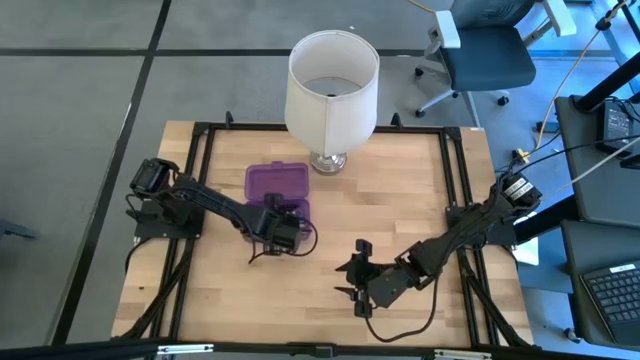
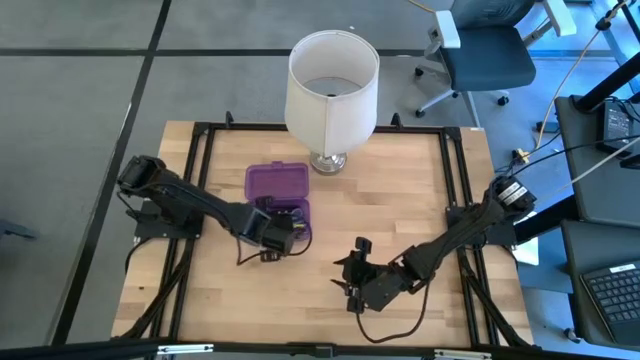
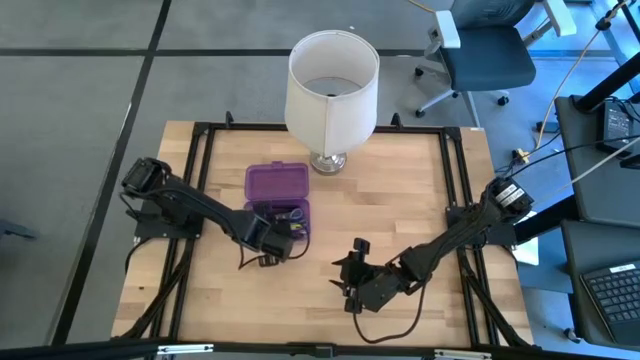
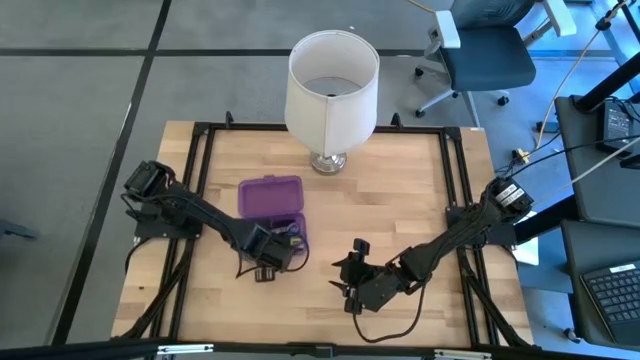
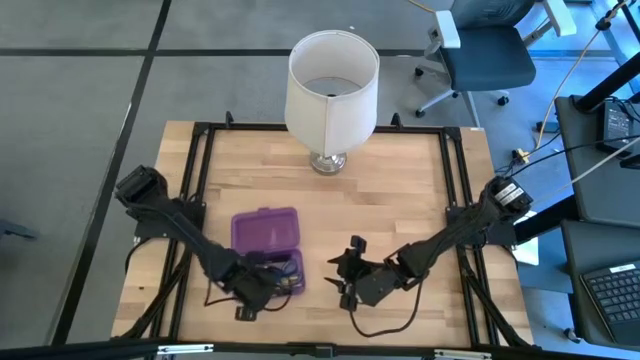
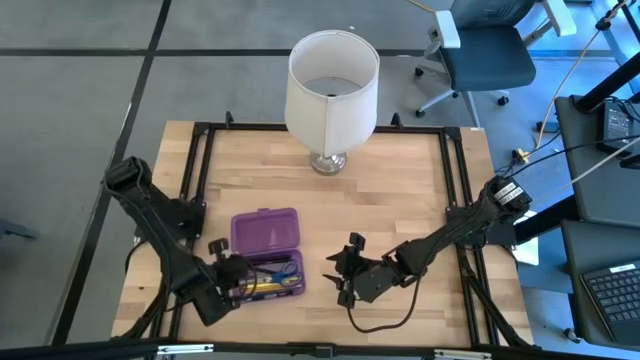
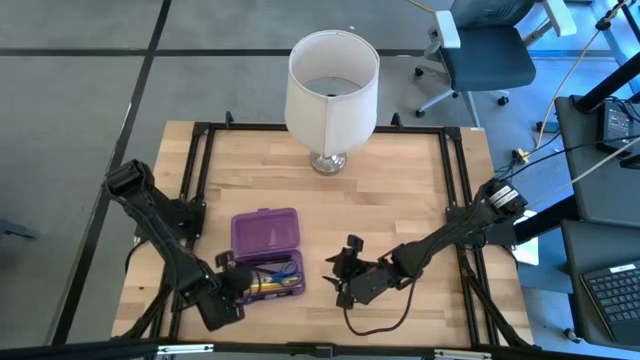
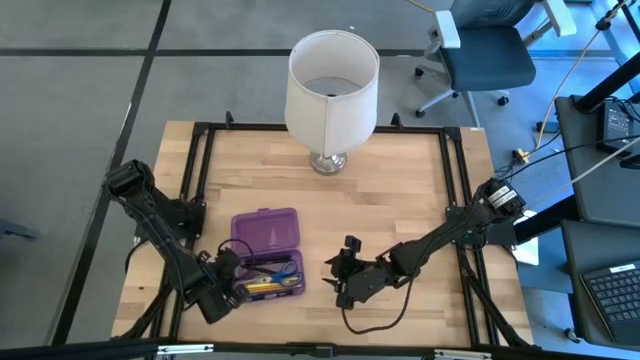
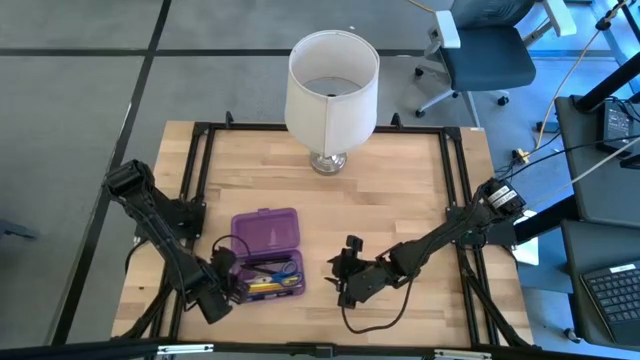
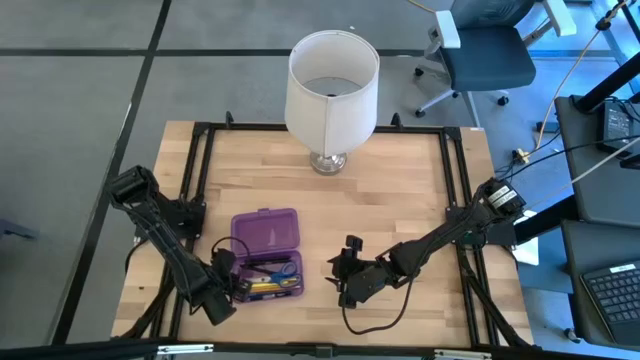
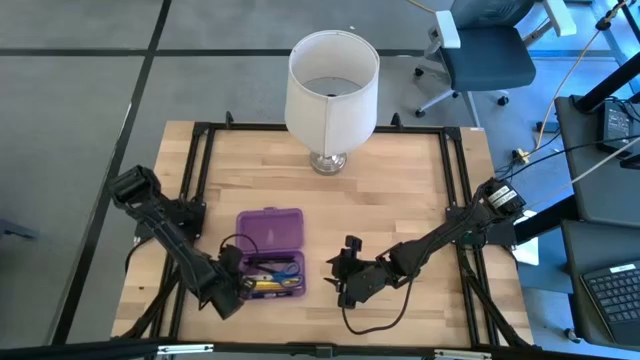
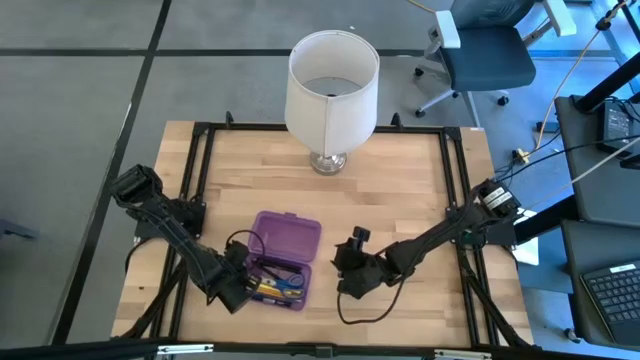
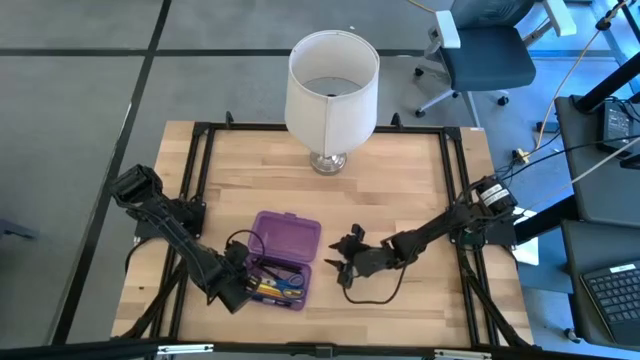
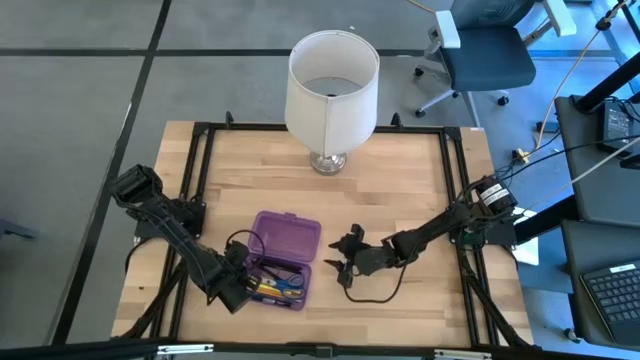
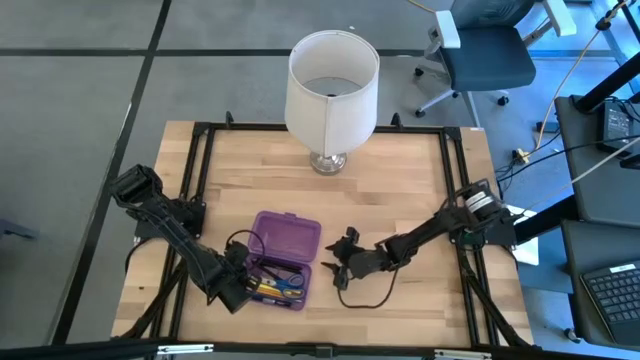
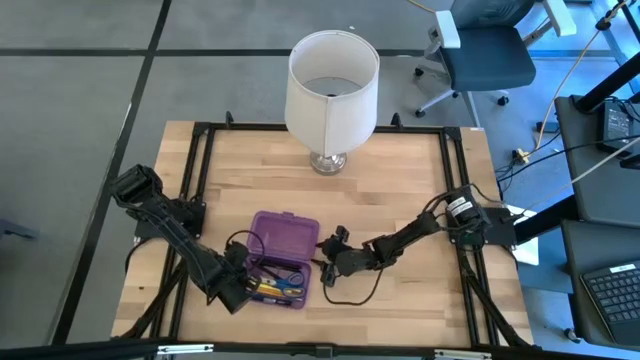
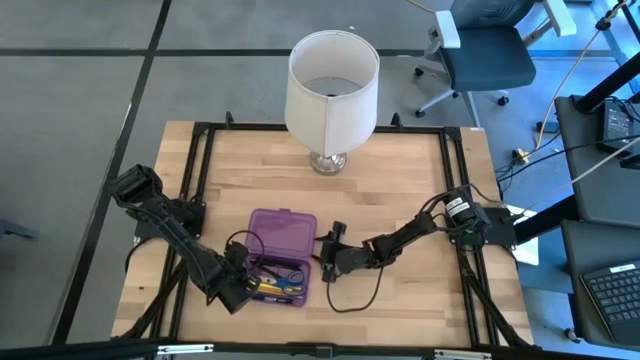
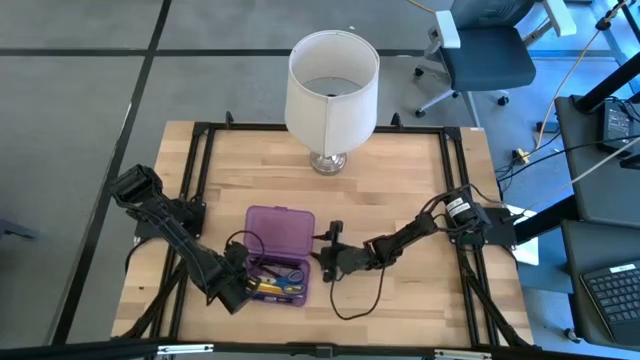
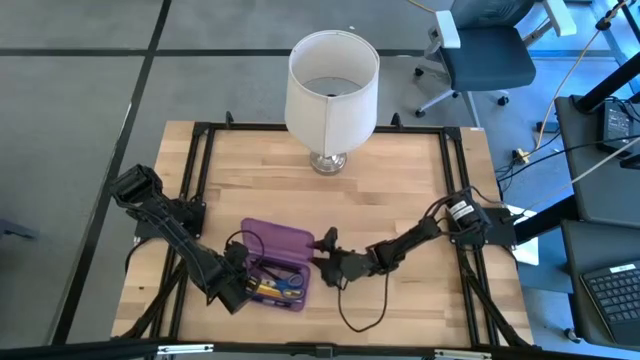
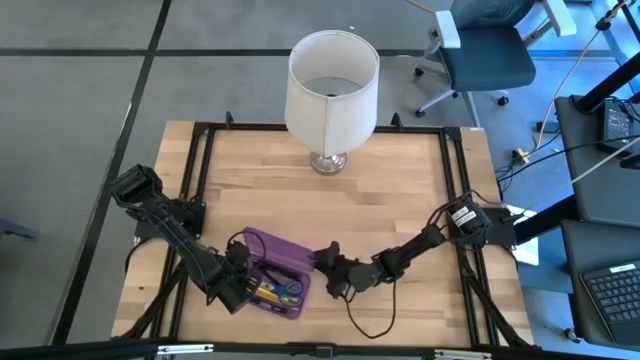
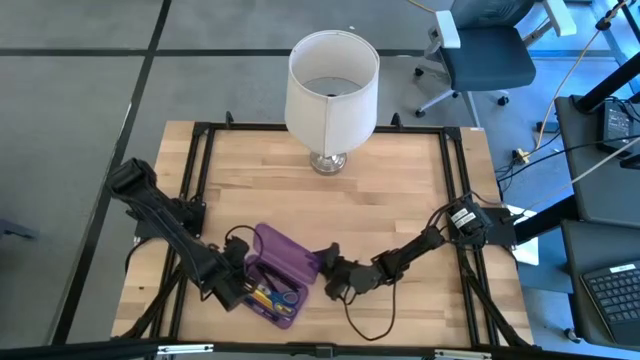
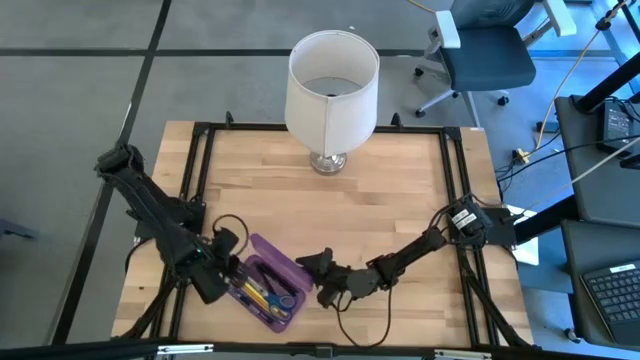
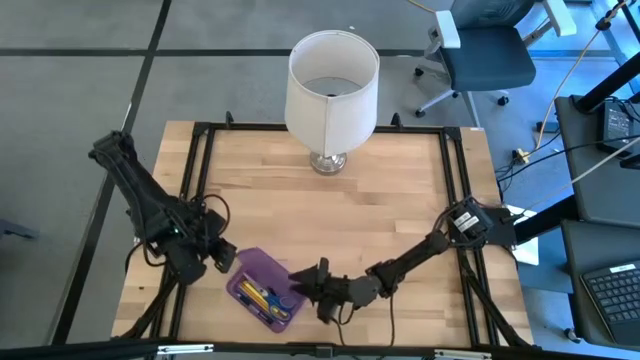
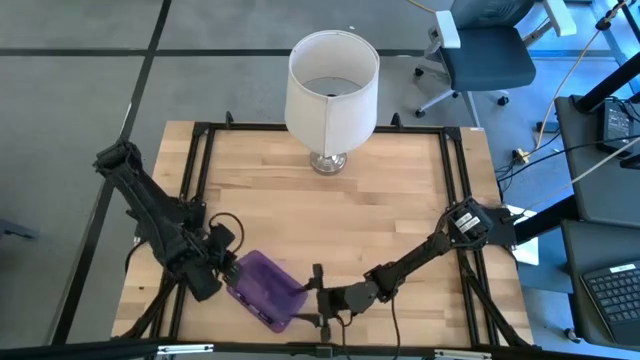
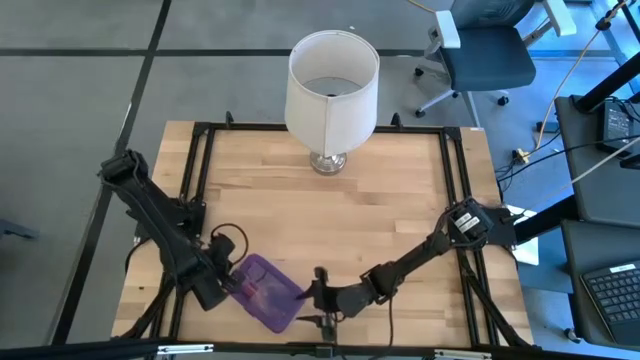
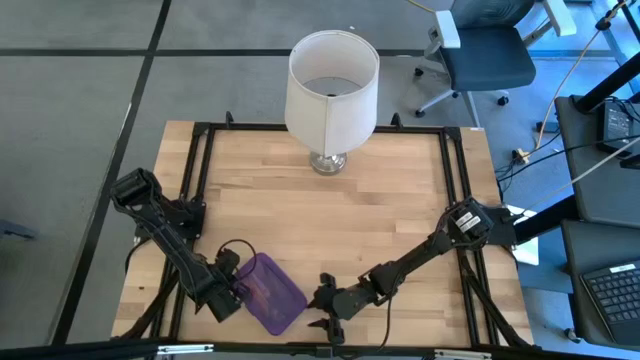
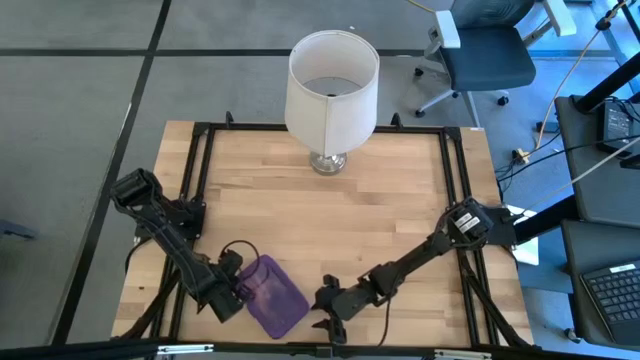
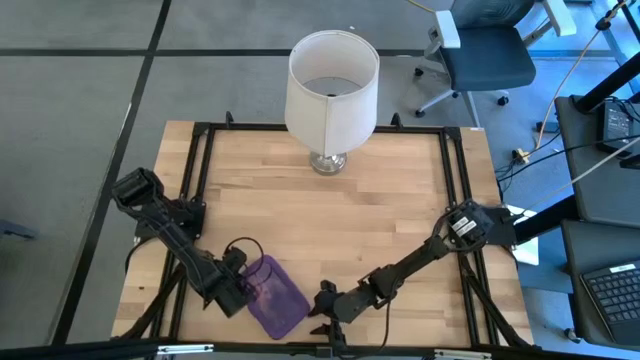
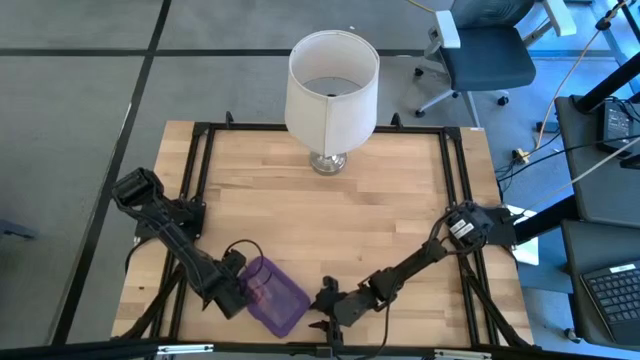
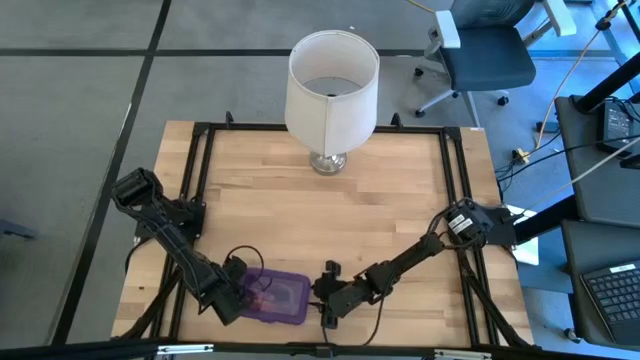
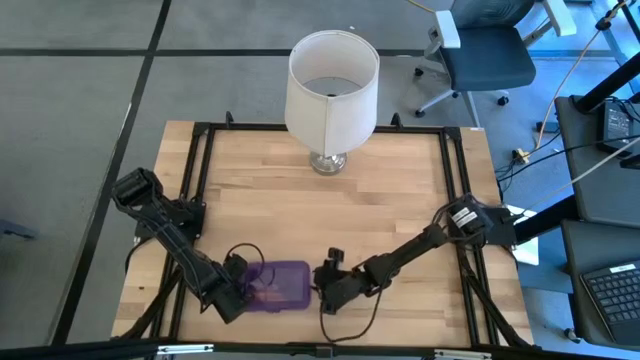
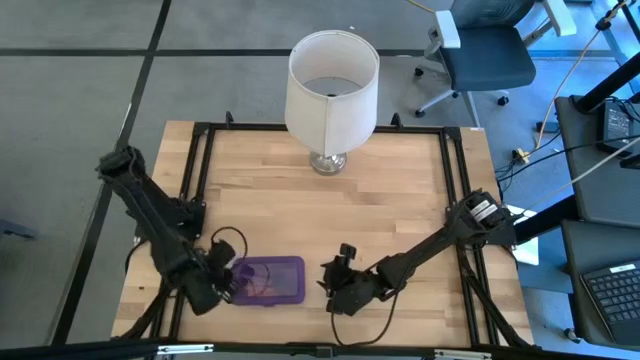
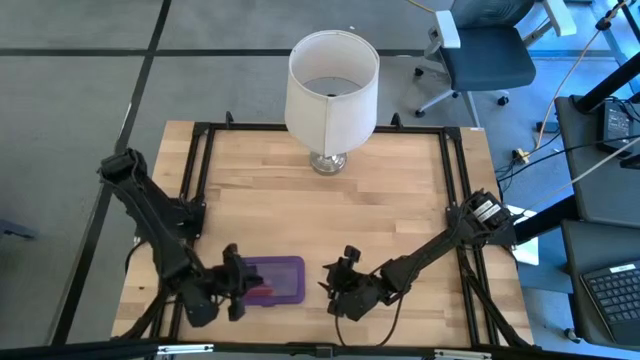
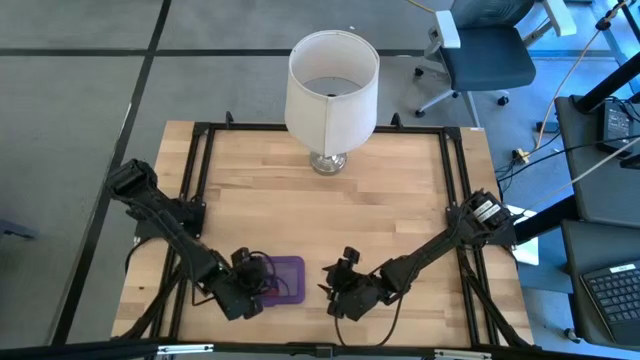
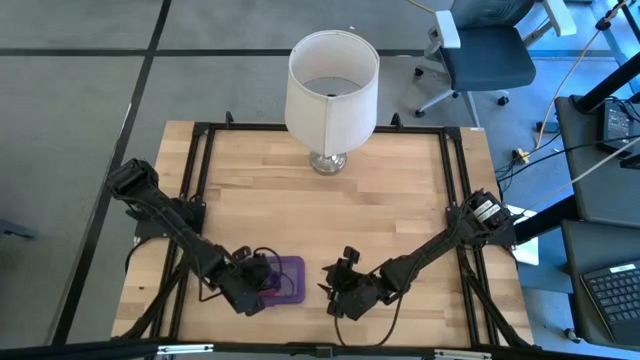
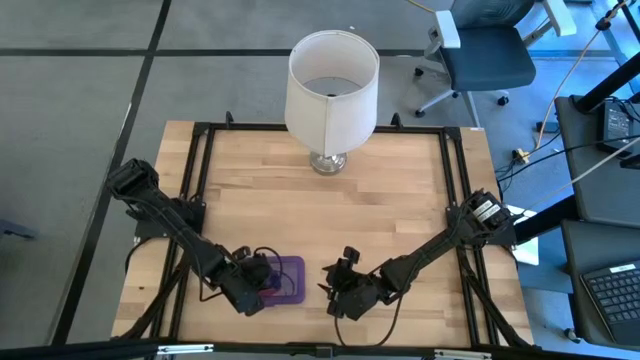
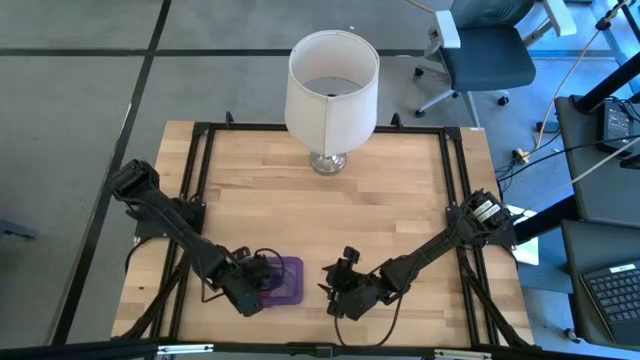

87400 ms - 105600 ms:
Task: Pick & place school supplies into a supply box
Close the purple supply box

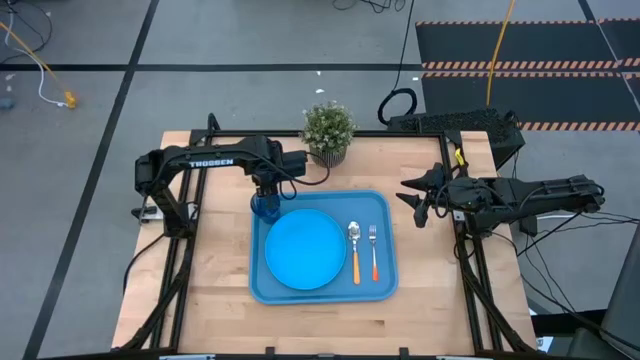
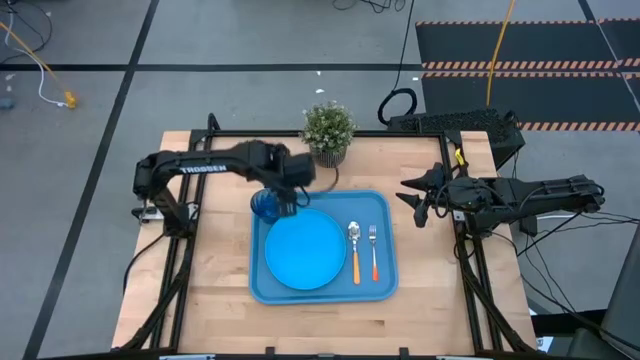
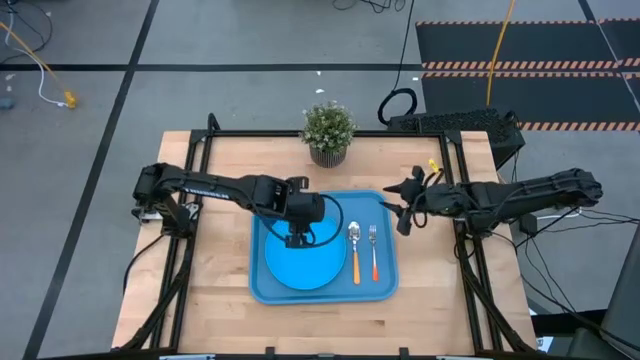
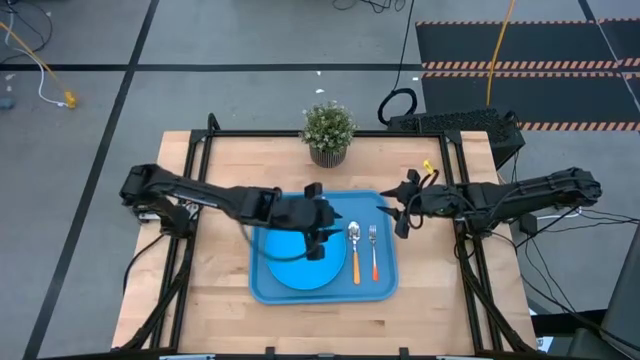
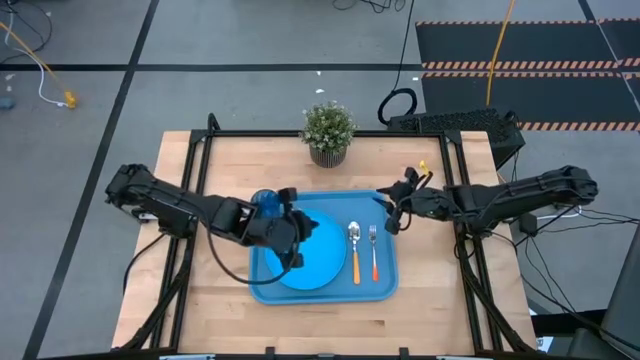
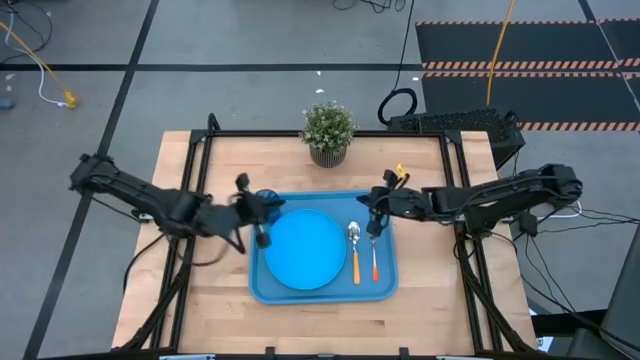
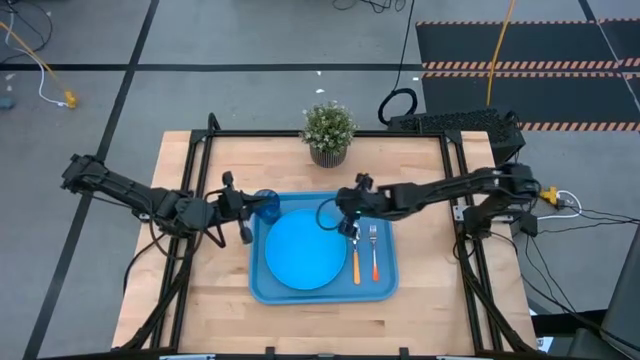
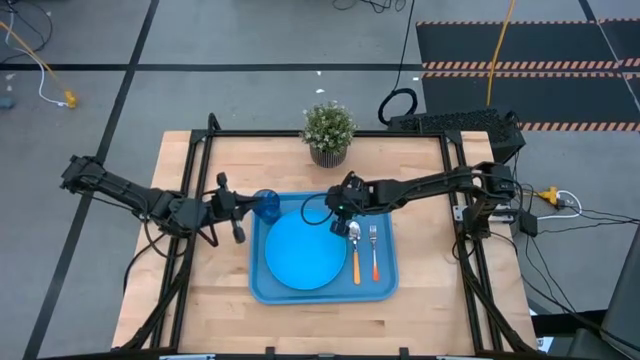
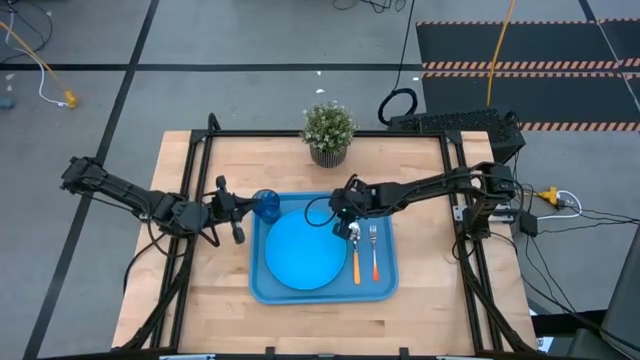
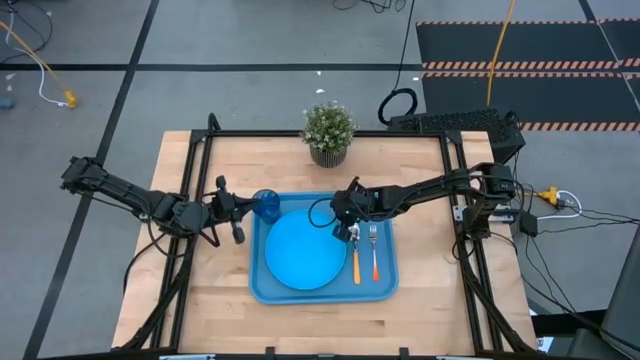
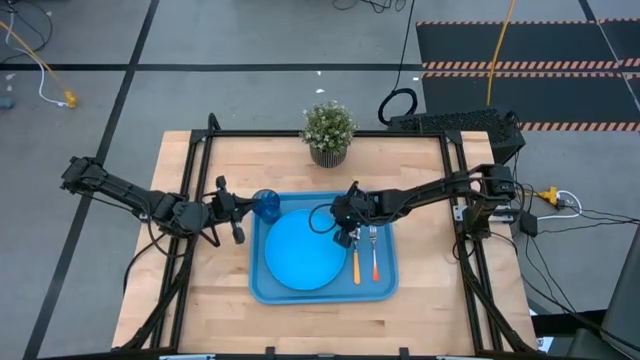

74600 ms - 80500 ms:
Task: Pick and place plate/cup/fork/spoon on tray
Adjust the blue plate on the blue tray
